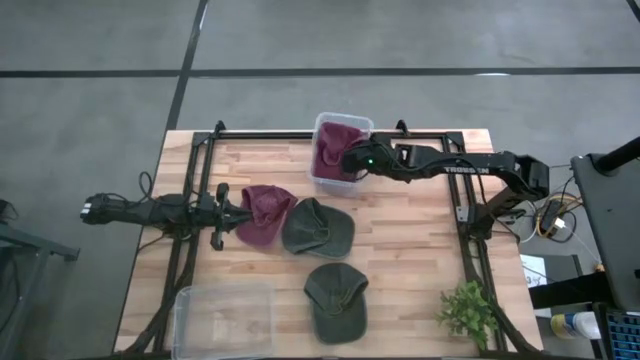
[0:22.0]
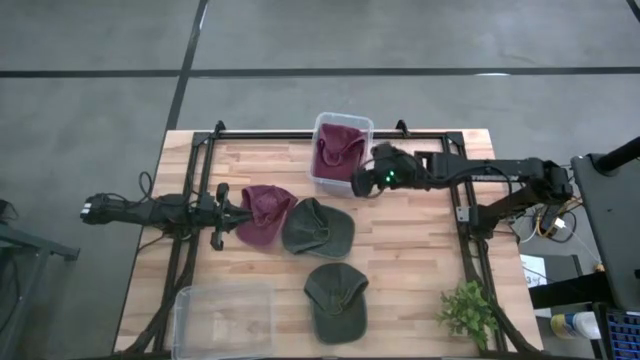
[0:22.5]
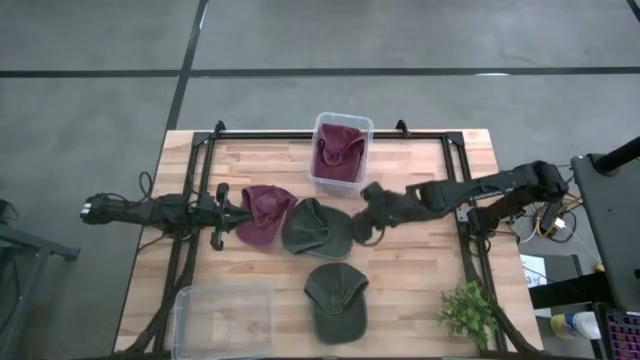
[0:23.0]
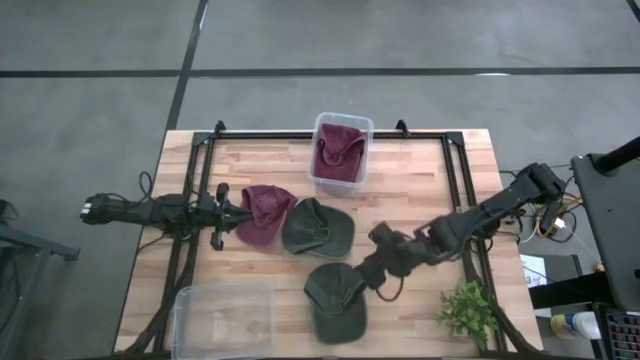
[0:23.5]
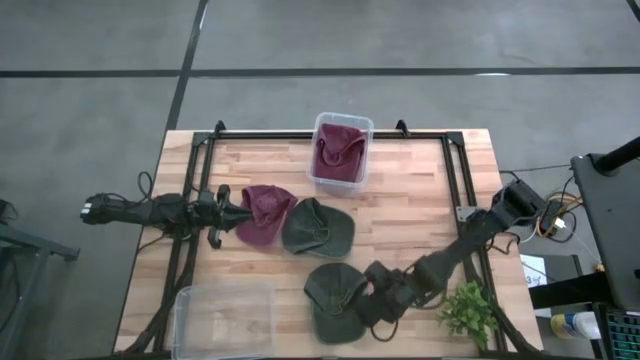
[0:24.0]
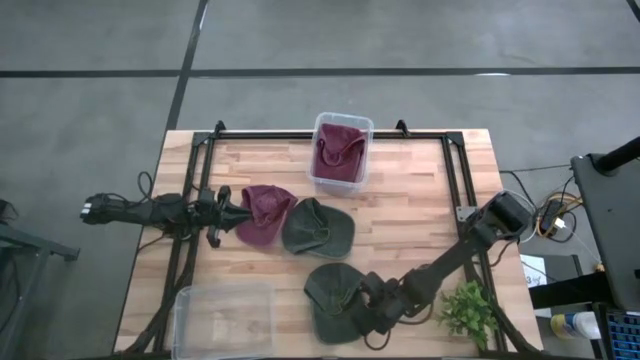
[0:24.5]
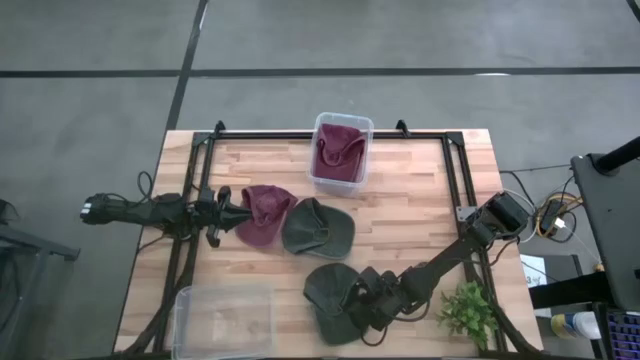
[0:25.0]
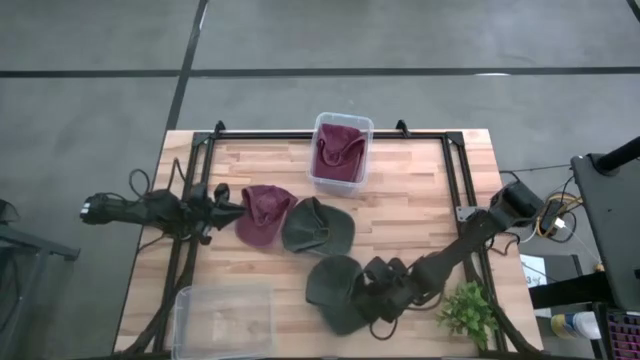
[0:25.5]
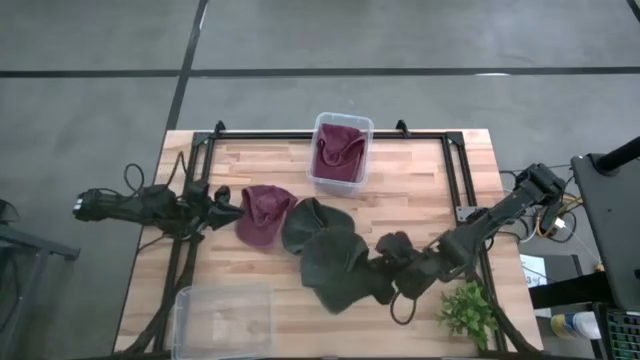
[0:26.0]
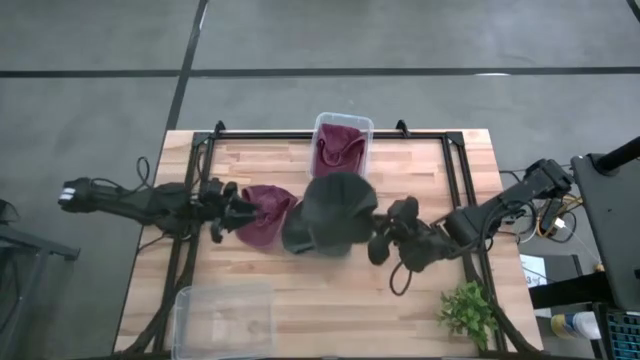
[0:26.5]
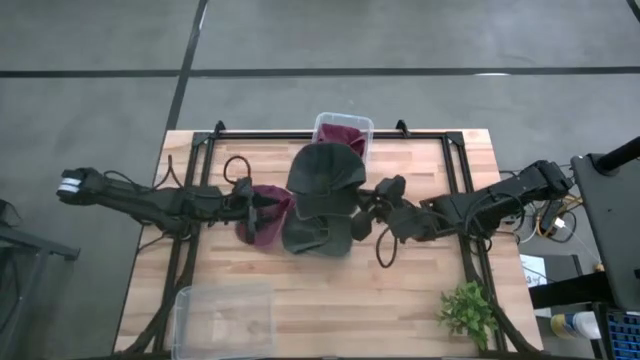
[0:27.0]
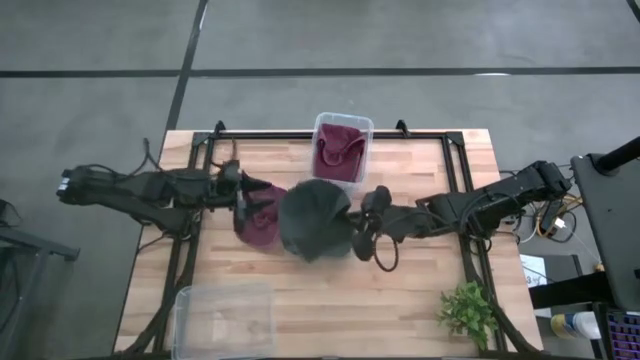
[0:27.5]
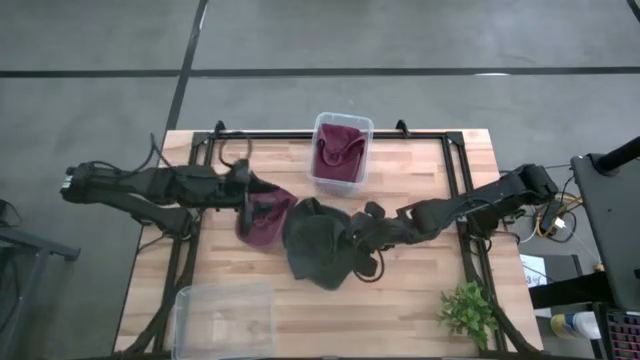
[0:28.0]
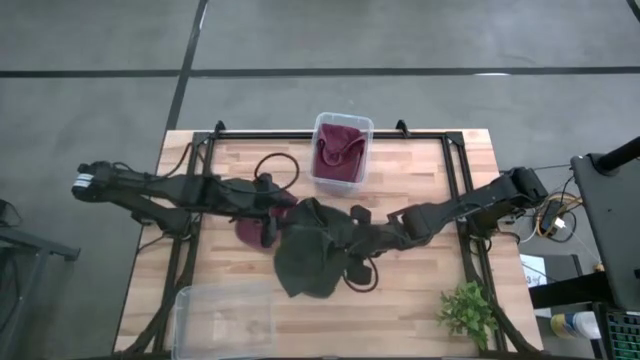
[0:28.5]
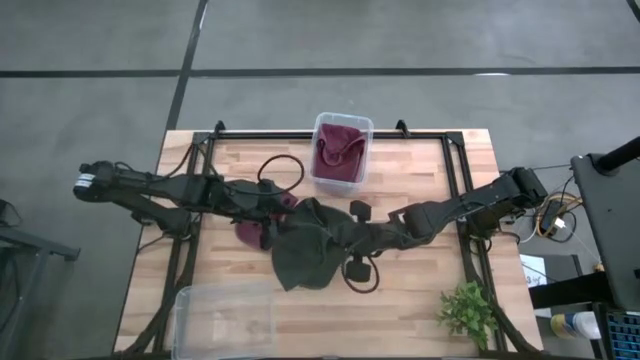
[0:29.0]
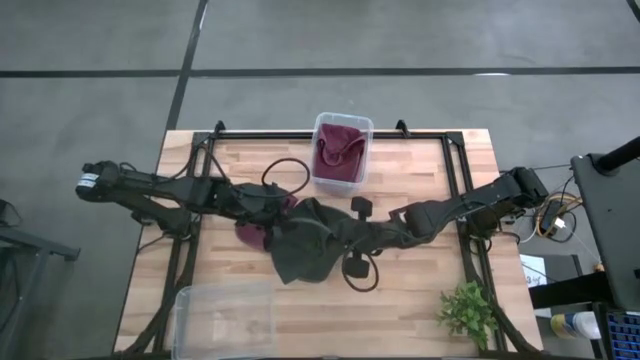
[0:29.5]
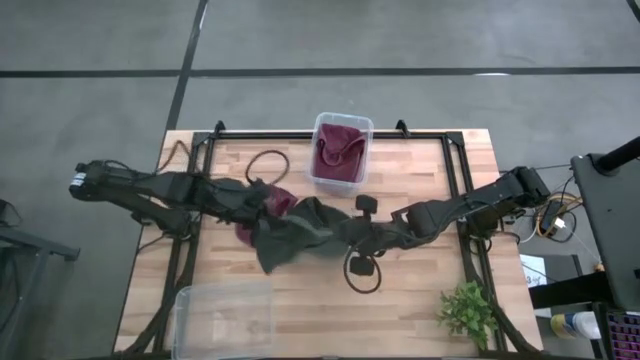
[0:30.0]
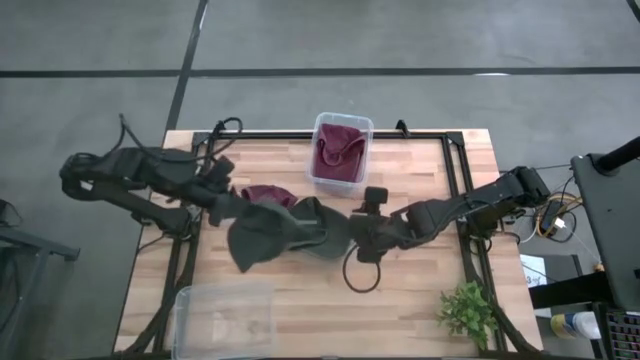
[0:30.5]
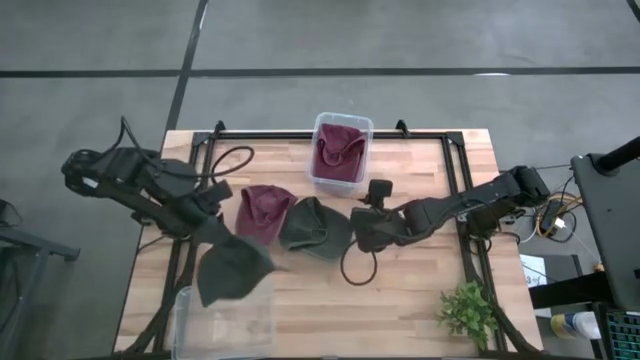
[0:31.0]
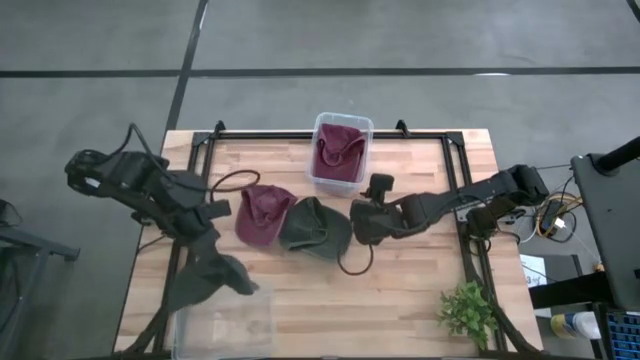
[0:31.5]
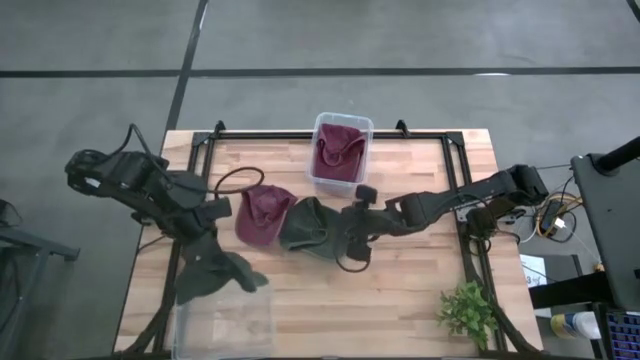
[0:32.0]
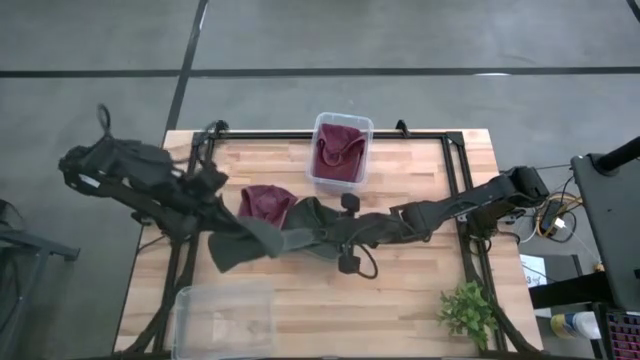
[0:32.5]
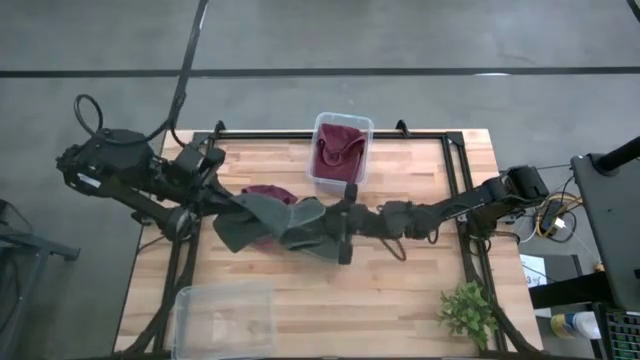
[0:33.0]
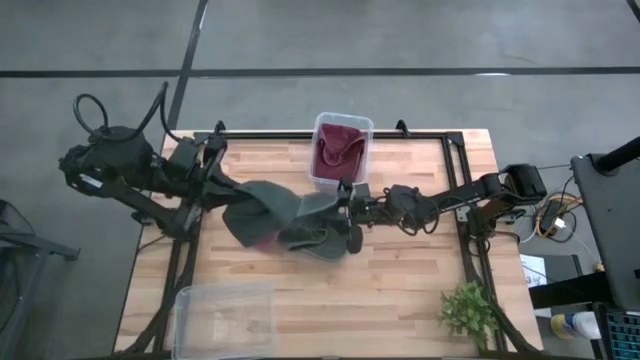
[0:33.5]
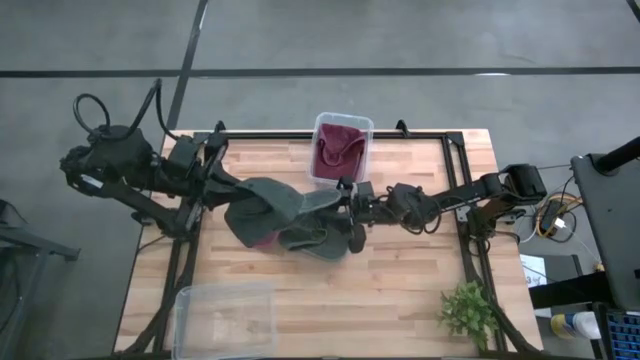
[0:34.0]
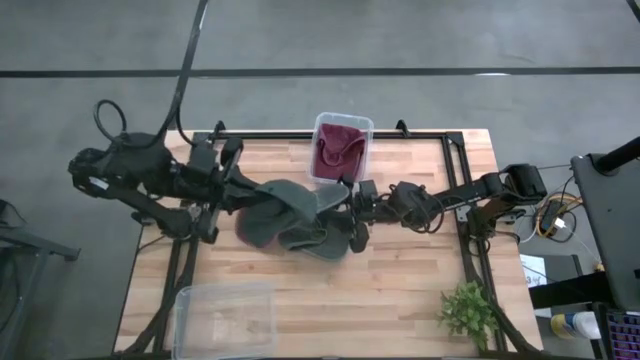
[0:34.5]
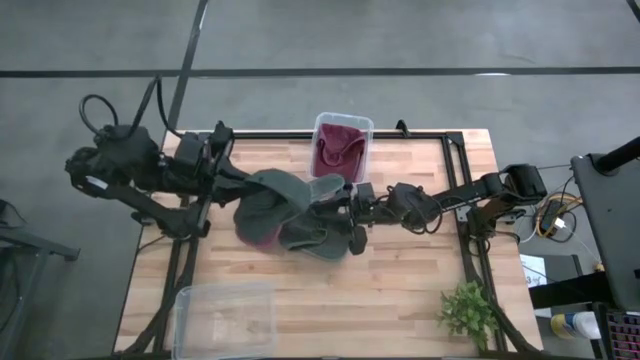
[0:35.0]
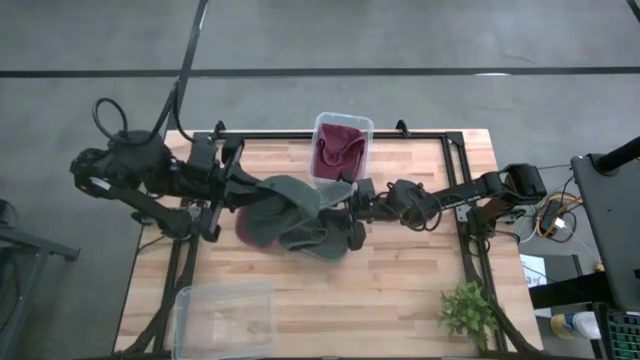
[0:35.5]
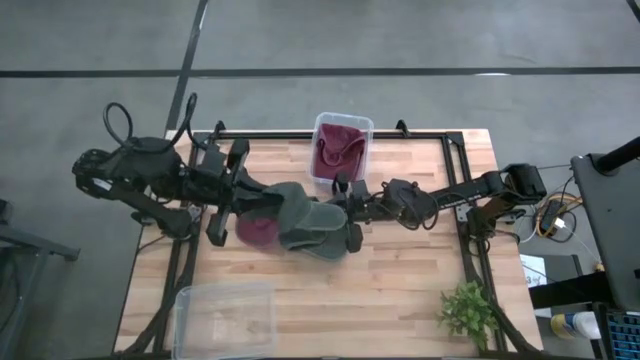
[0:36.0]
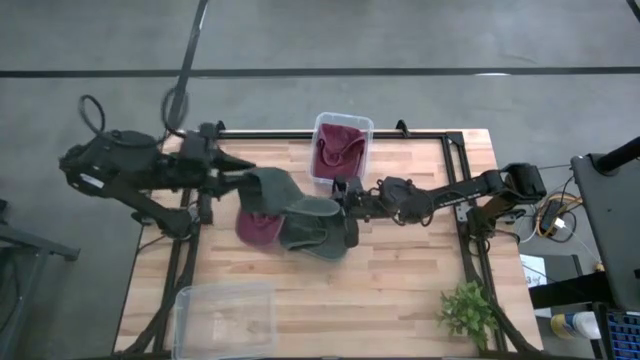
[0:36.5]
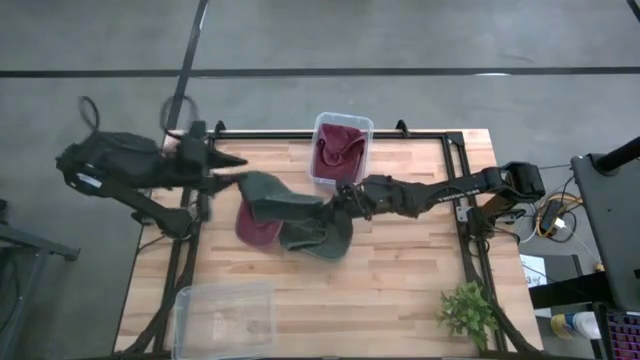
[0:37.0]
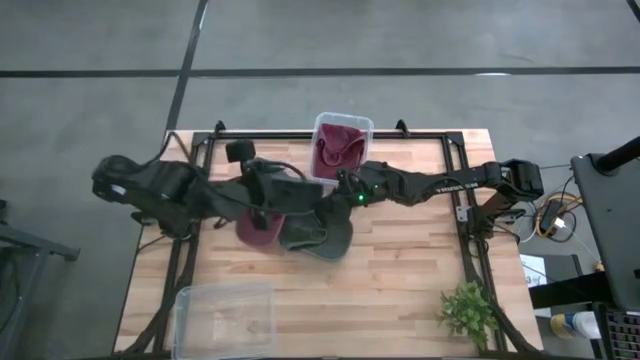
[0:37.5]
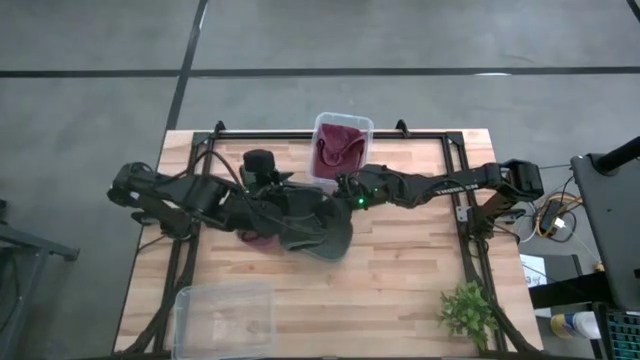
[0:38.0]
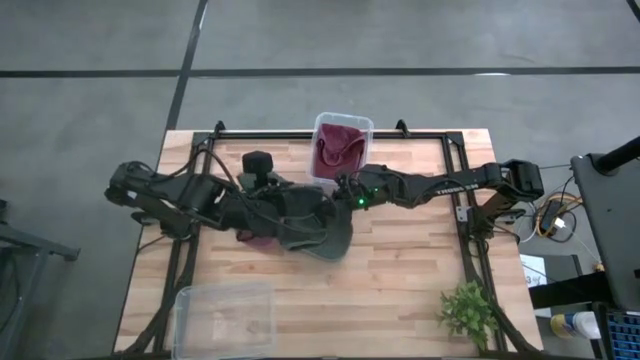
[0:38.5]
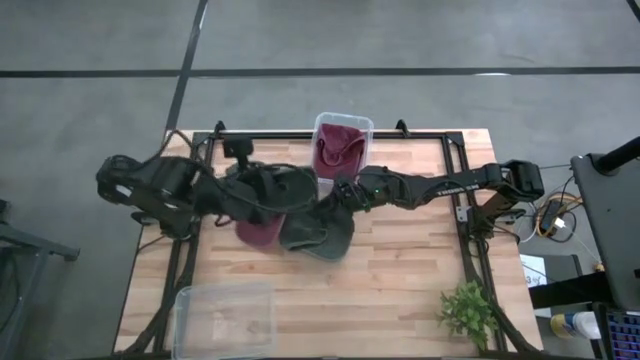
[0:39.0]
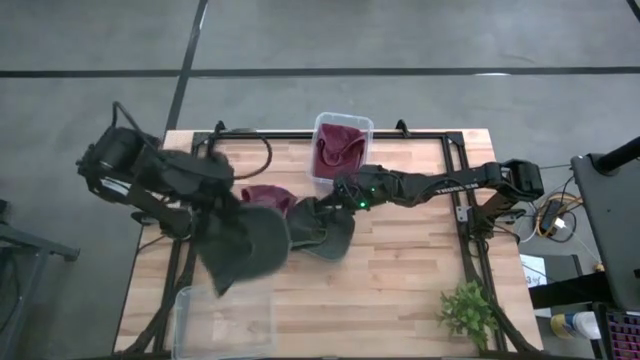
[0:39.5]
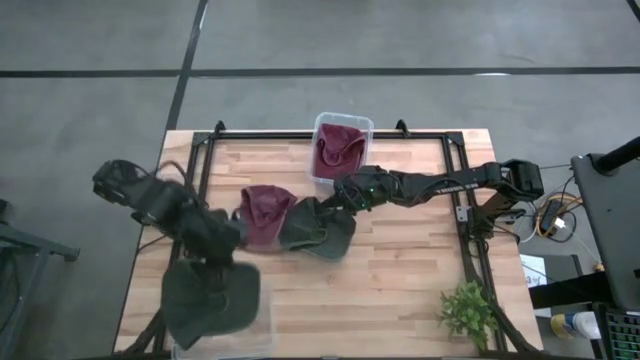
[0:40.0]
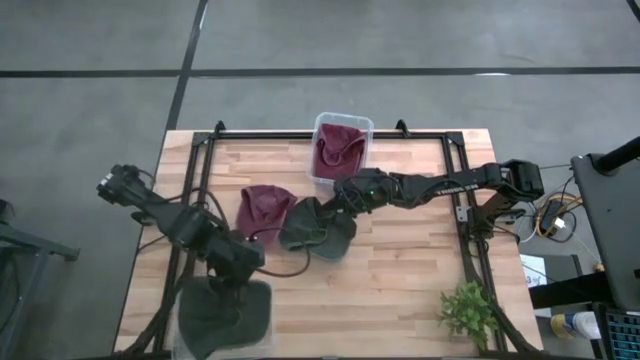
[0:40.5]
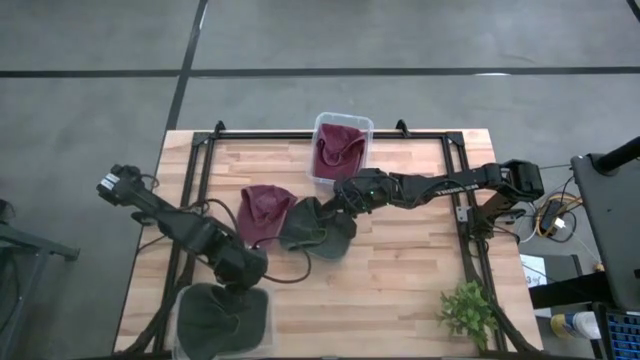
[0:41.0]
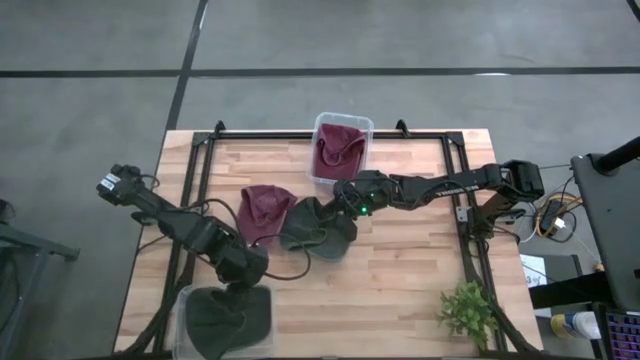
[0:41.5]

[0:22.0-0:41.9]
Task: Pick & Place hat
Put the bottom black cap into the bottom transparent bin

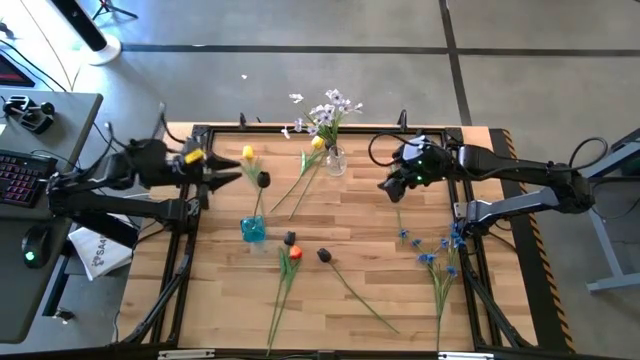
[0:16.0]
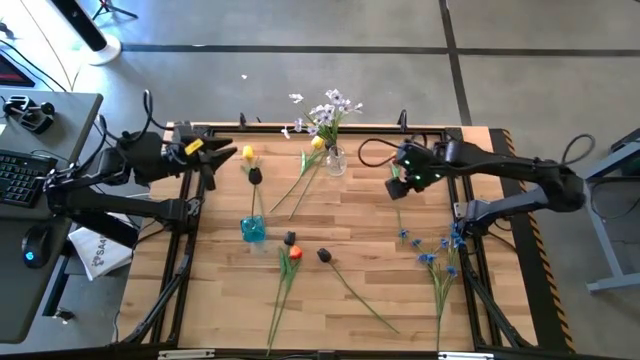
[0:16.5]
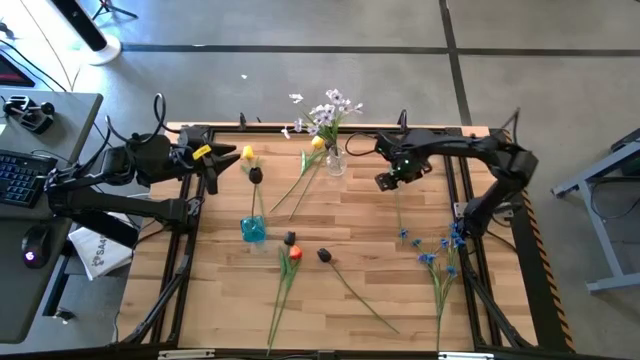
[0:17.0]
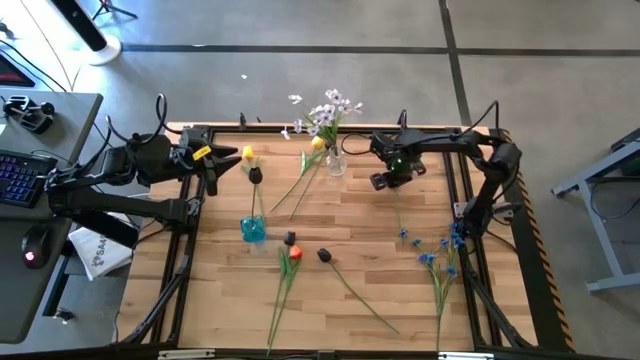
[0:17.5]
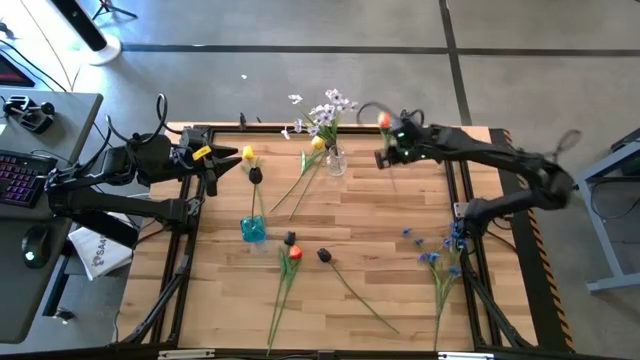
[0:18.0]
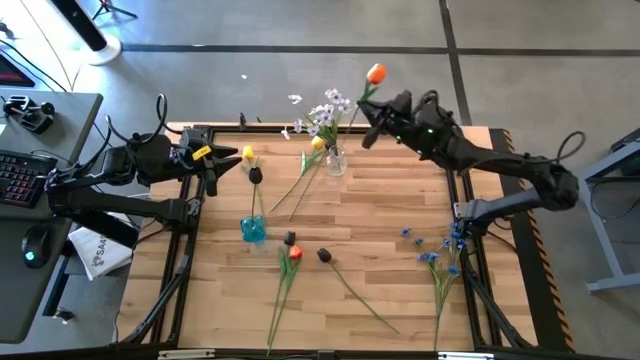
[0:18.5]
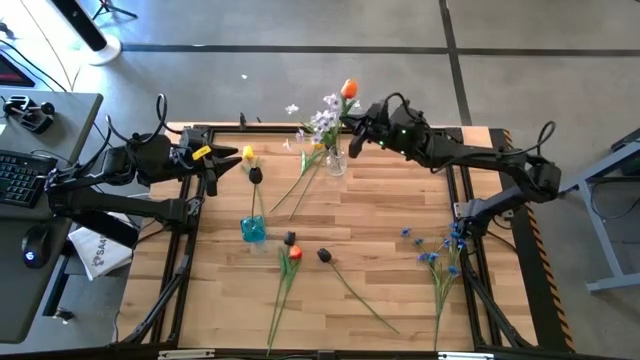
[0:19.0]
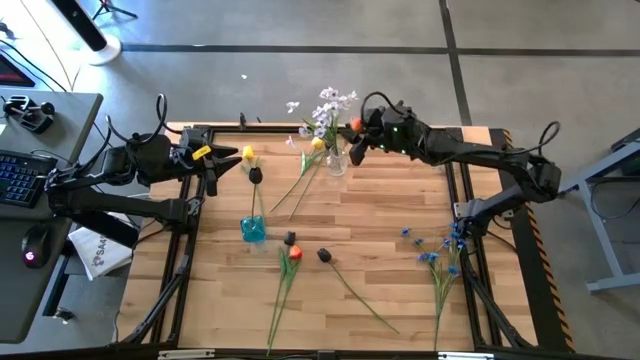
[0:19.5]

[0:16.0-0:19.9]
Task: Sort flowers into vase by color
Put the top orange flower into the transparent vase
